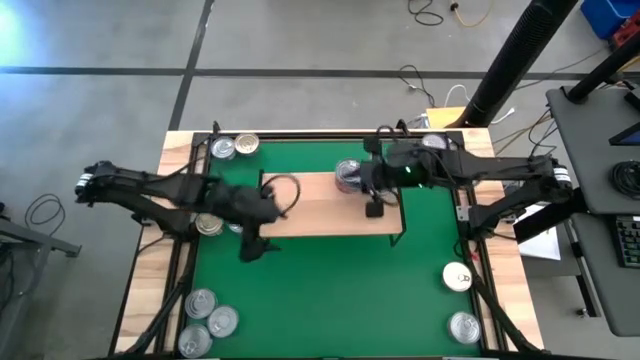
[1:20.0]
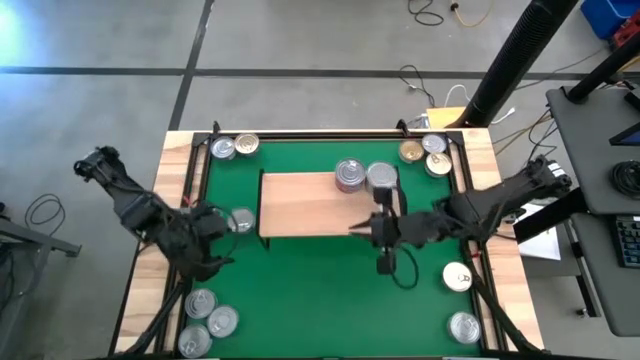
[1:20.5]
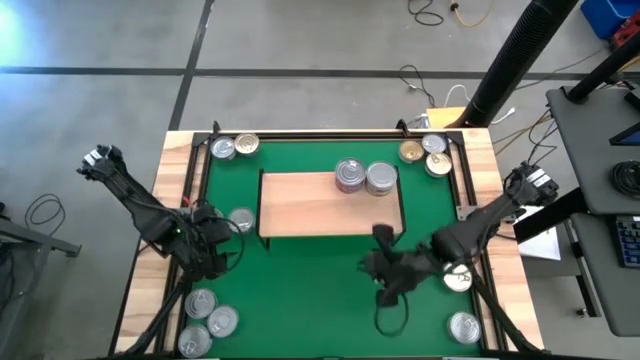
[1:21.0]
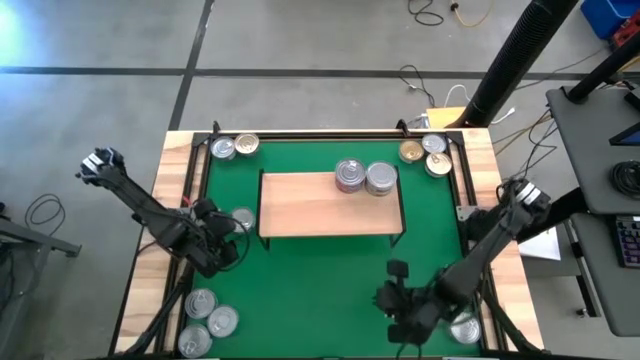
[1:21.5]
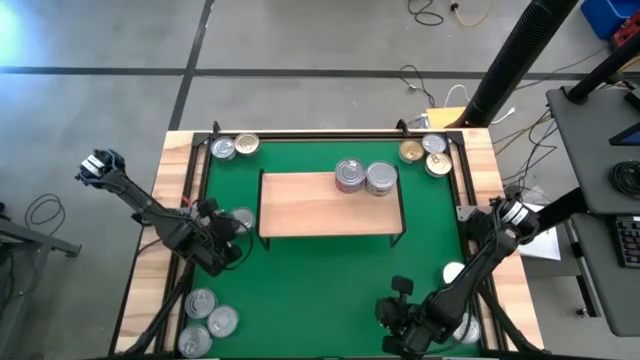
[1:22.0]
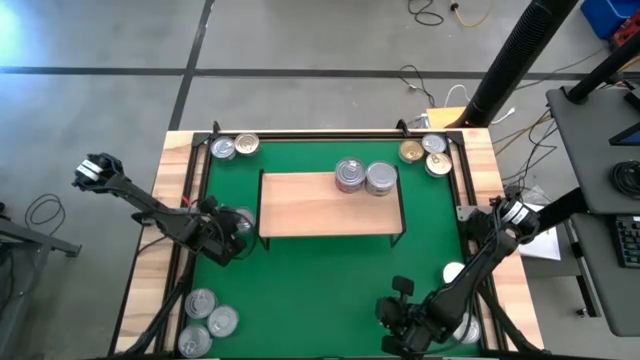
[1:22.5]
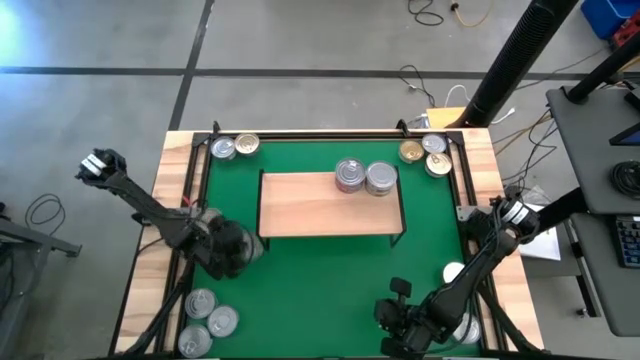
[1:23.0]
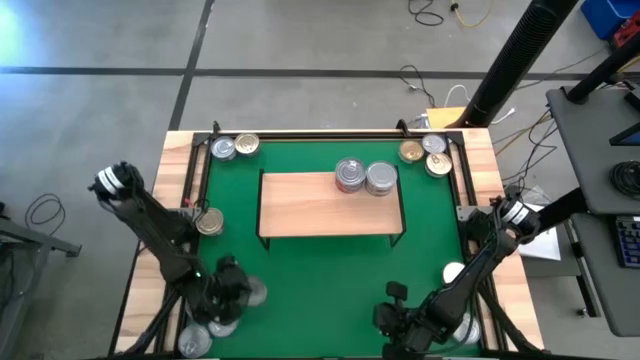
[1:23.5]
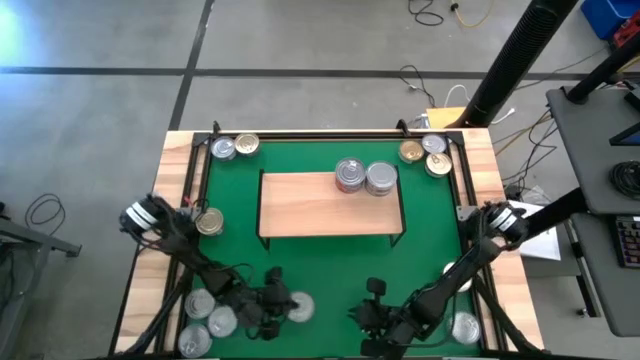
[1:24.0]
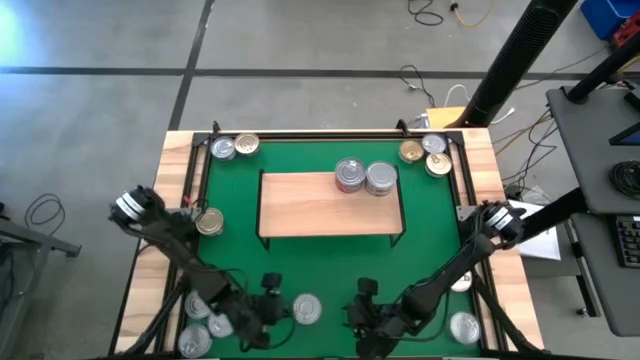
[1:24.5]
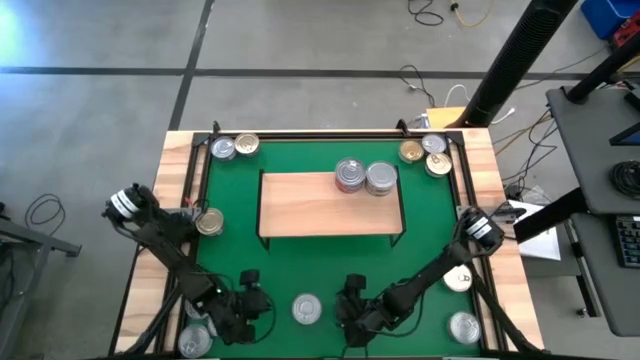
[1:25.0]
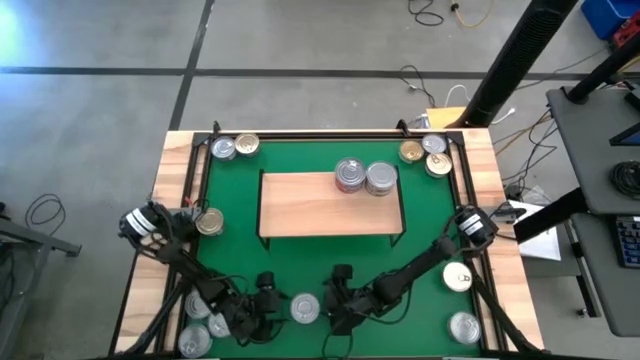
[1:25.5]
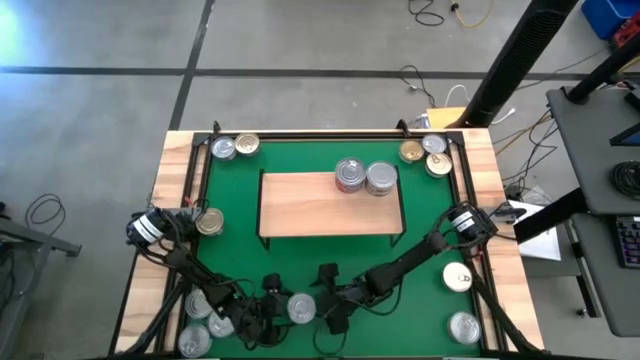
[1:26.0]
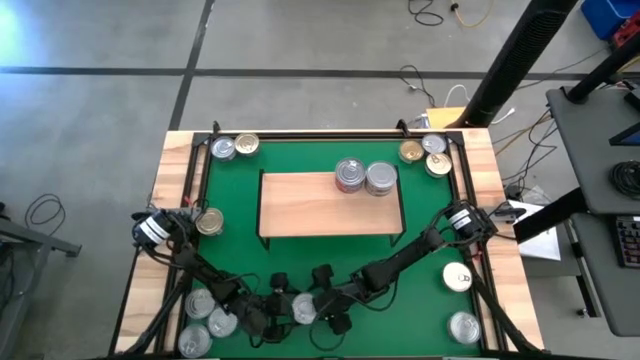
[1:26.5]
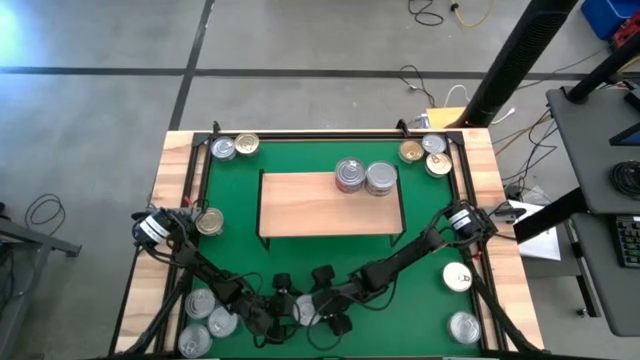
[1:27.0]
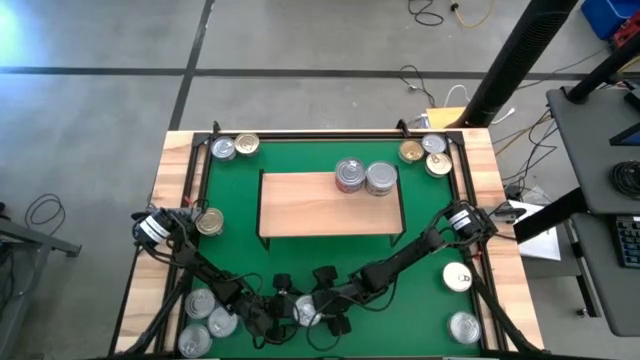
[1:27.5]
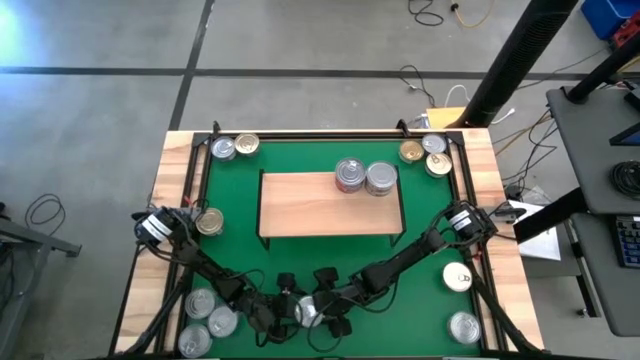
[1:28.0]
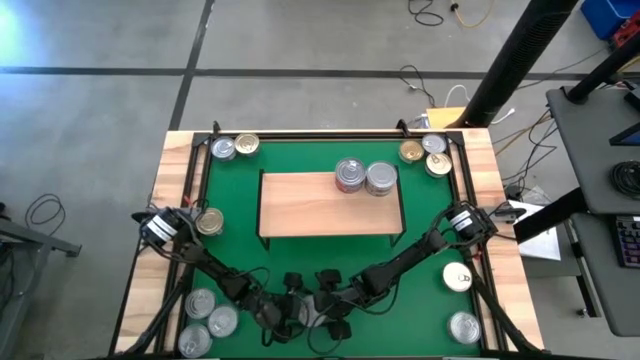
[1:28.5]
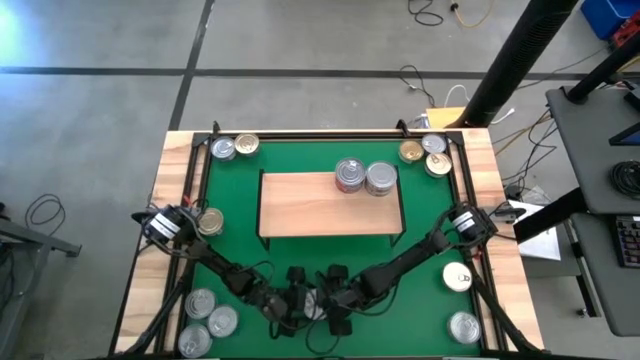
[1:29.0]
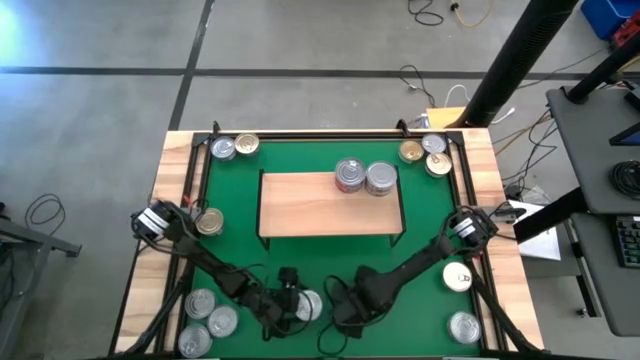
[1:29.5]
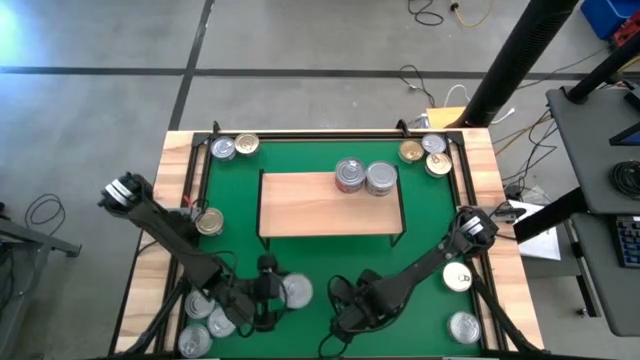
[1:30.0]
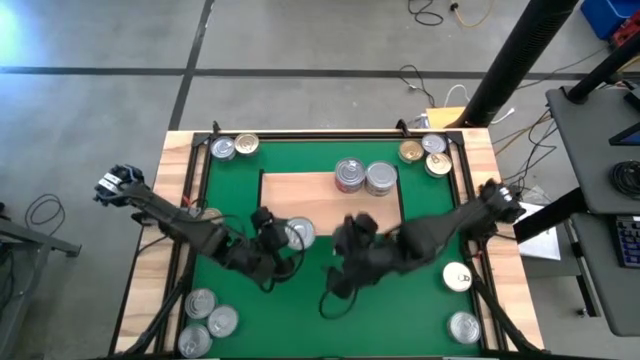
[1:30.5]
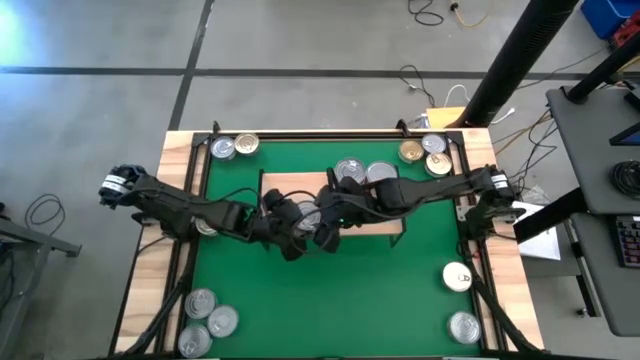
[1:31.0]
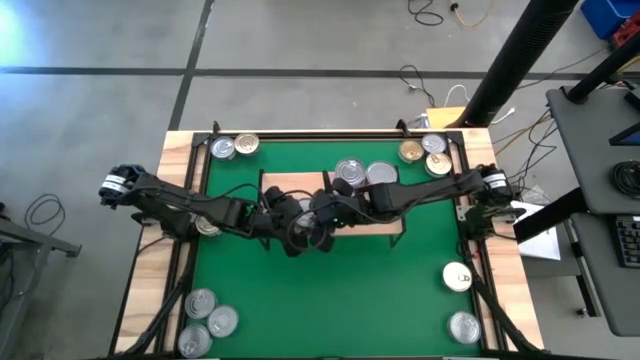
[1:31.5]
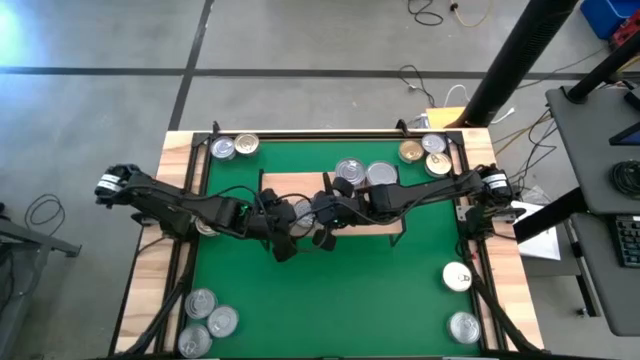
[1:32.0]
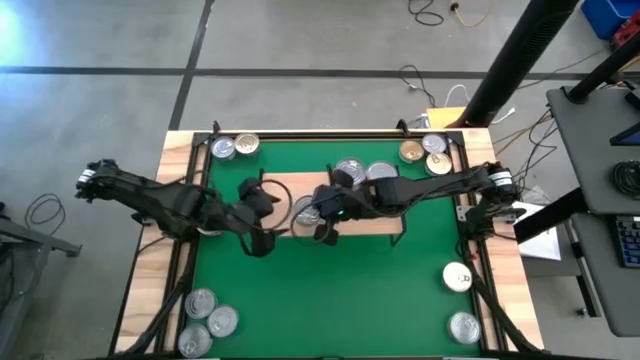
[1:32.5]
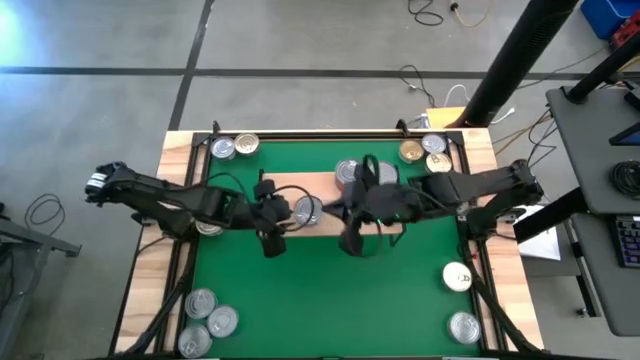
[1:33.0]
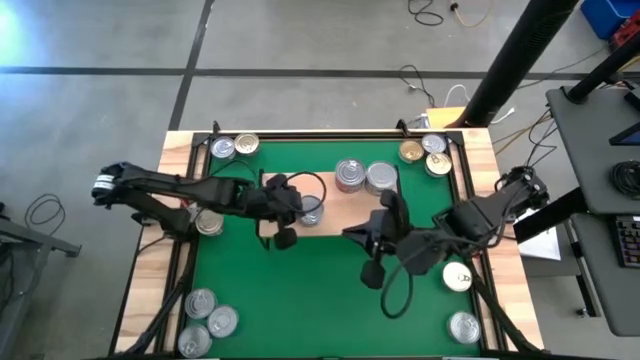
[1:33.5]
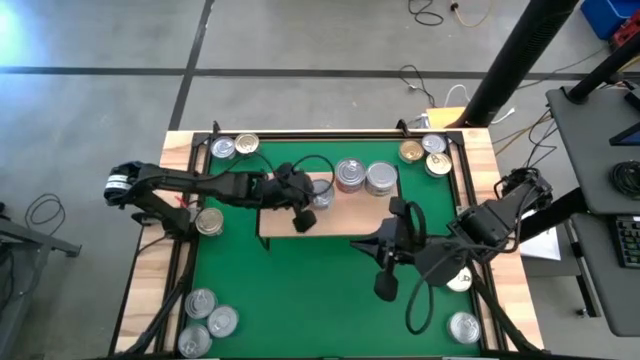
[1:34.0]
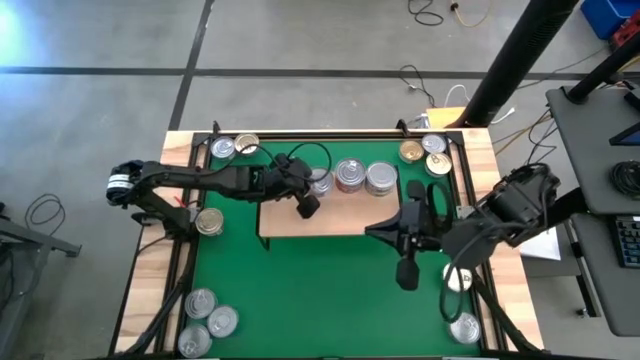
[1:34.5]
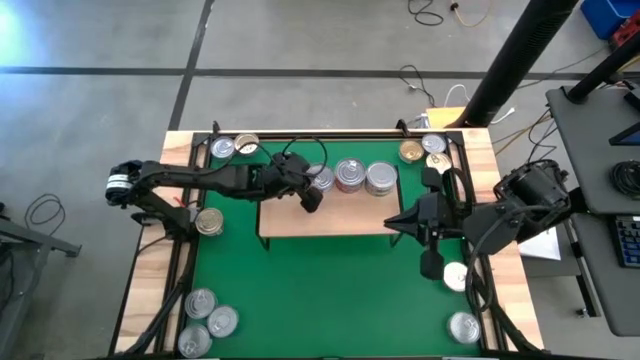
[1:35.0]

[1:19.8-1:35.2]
Task: Stack canned seafood by type on shelf
Put the bottom blue tuna can on the shelf
